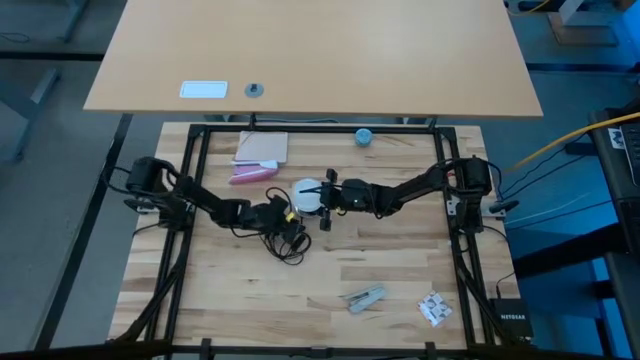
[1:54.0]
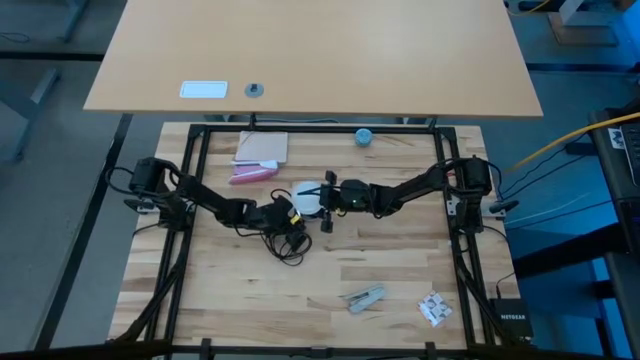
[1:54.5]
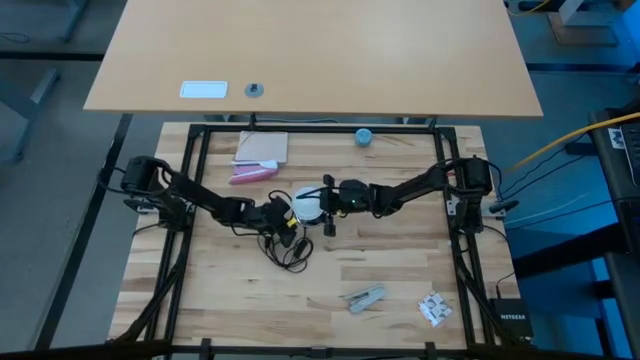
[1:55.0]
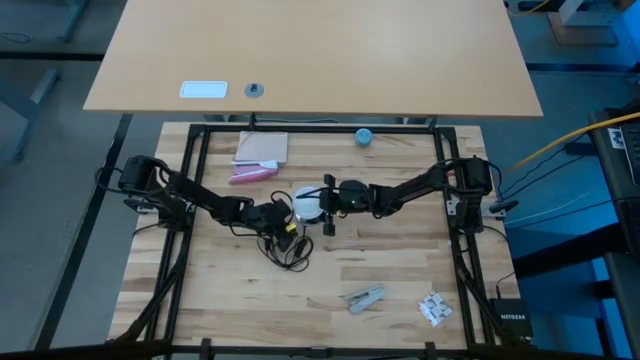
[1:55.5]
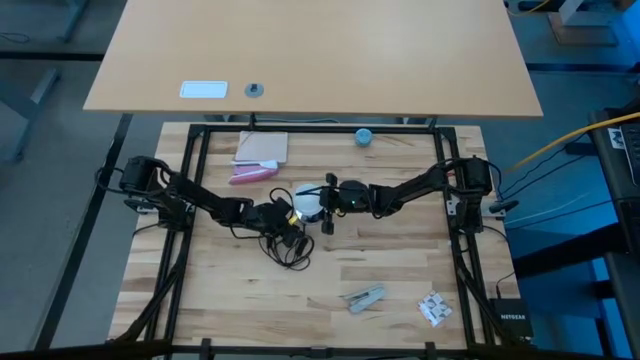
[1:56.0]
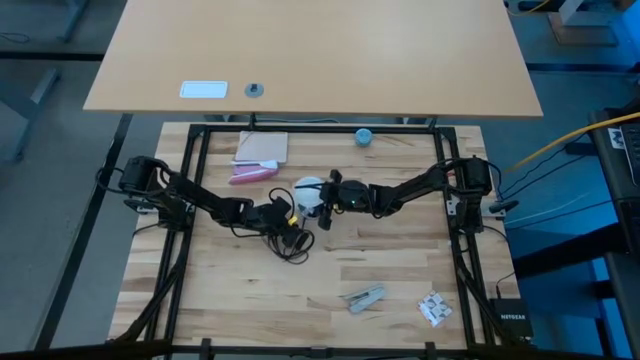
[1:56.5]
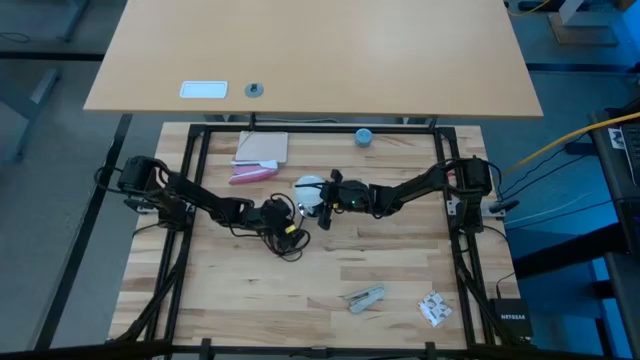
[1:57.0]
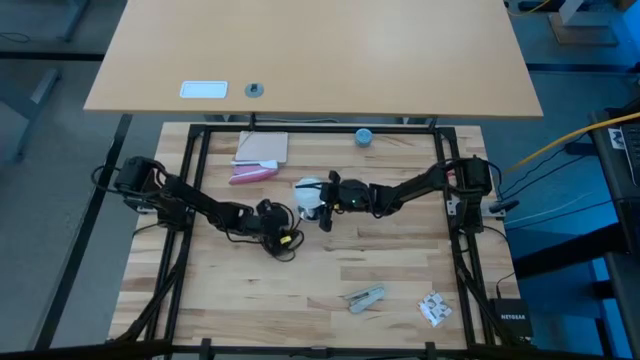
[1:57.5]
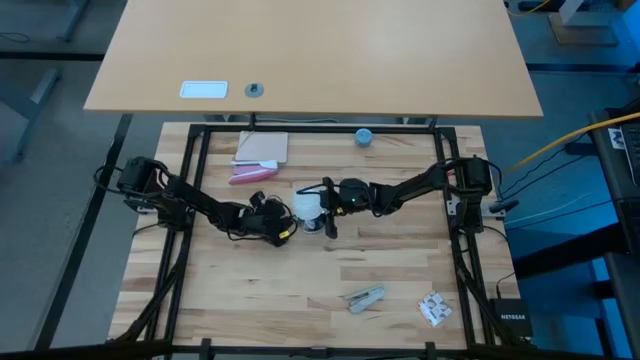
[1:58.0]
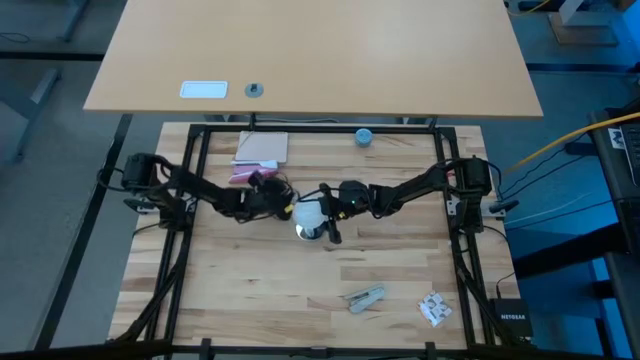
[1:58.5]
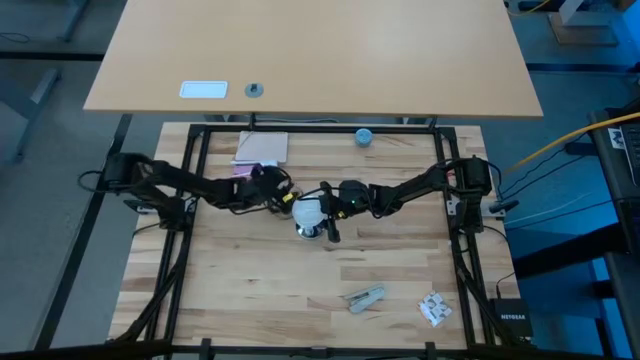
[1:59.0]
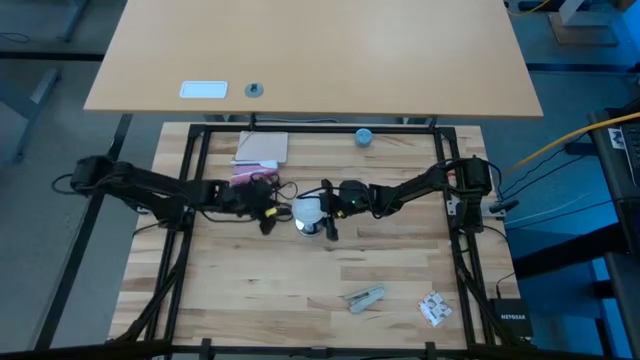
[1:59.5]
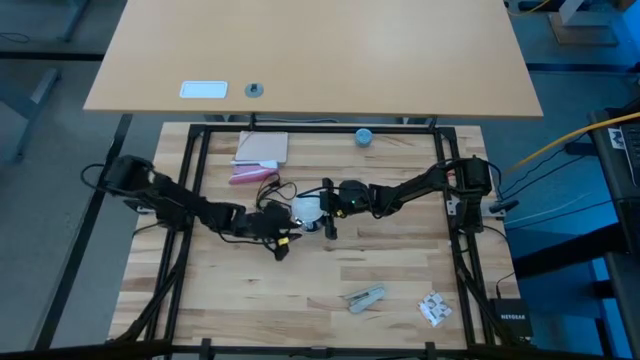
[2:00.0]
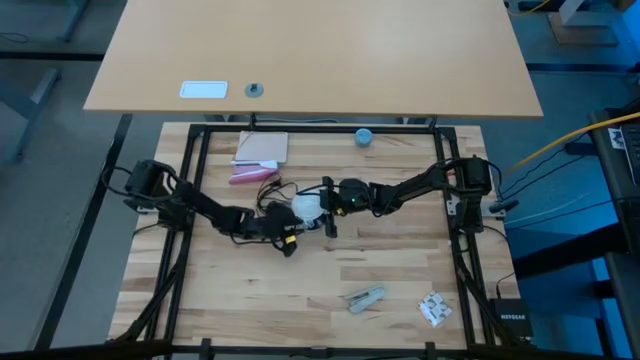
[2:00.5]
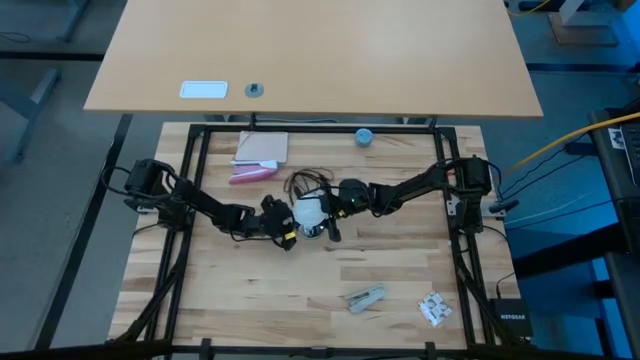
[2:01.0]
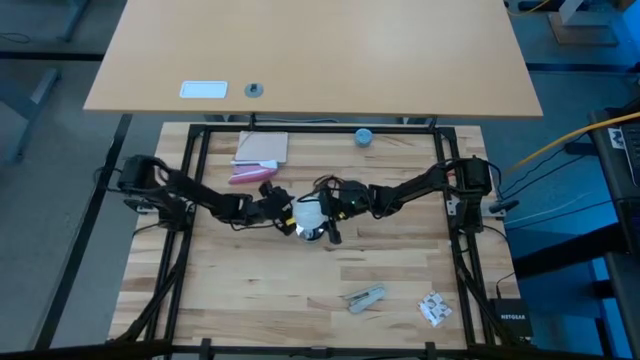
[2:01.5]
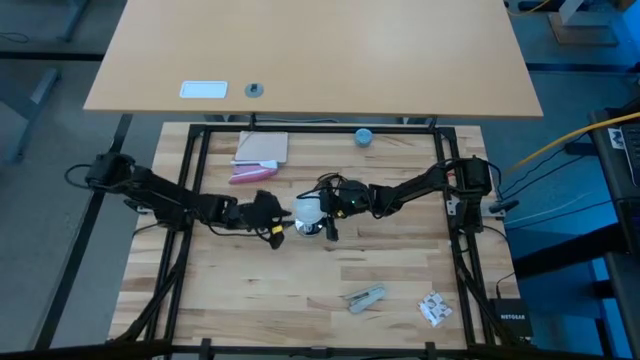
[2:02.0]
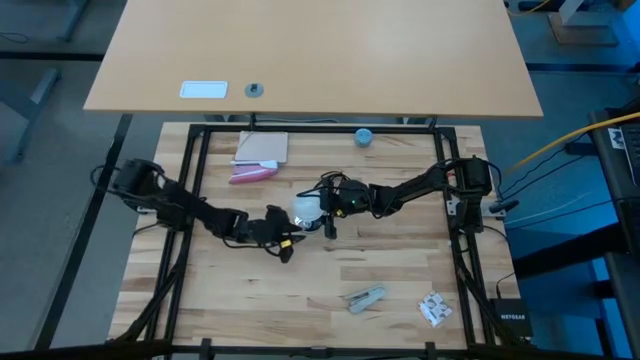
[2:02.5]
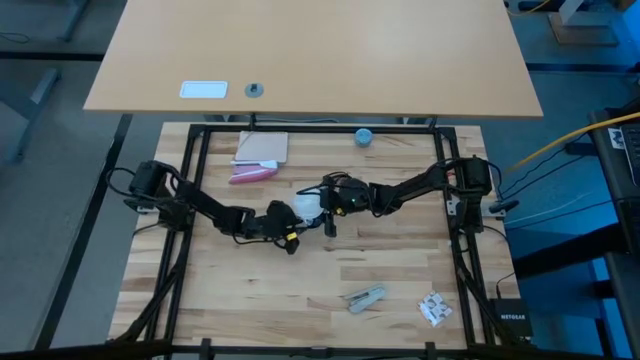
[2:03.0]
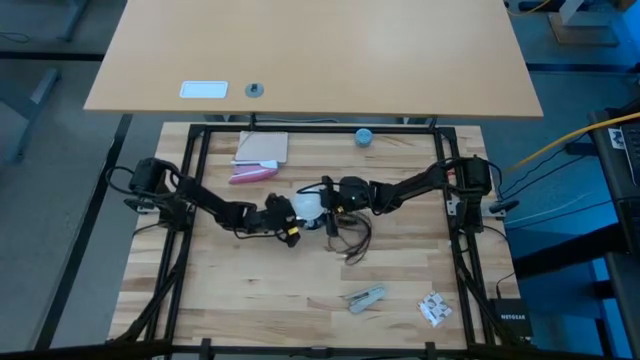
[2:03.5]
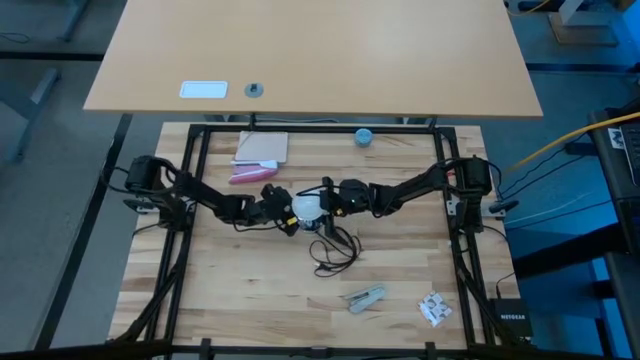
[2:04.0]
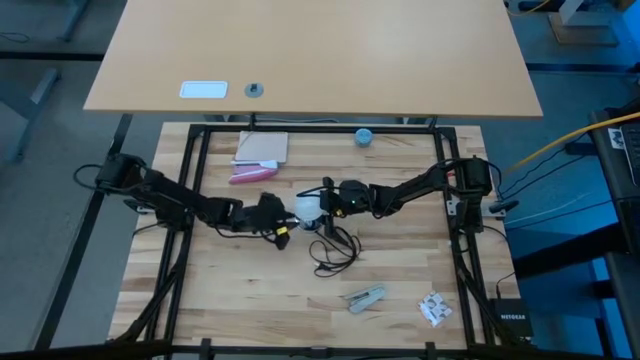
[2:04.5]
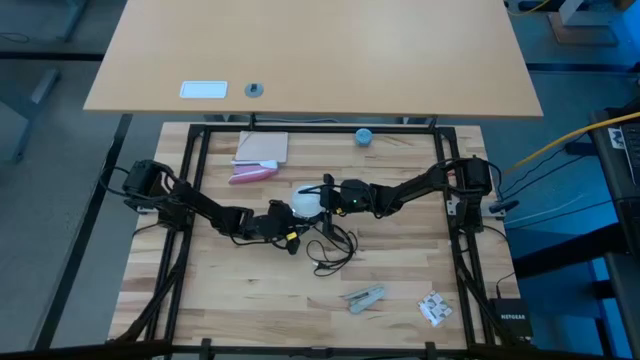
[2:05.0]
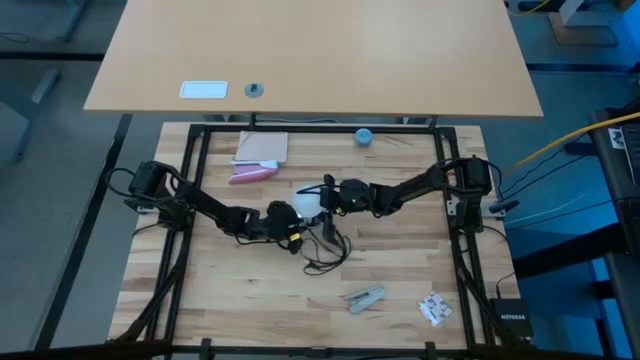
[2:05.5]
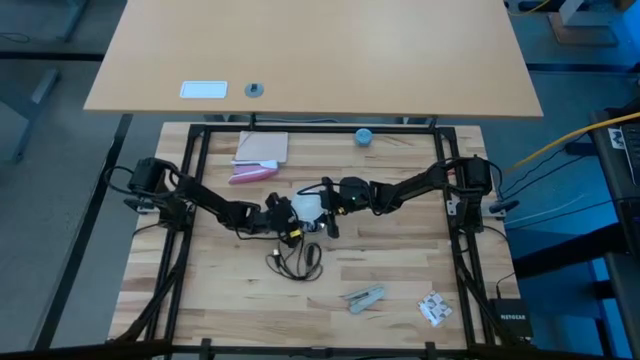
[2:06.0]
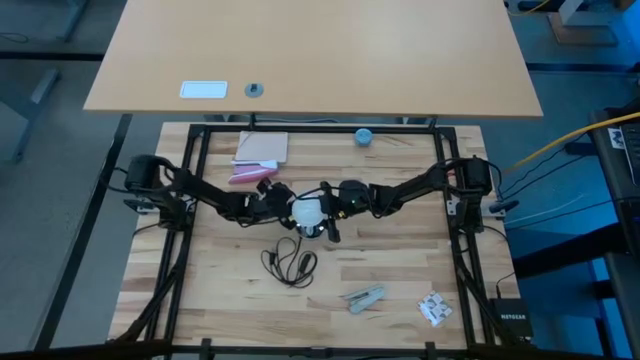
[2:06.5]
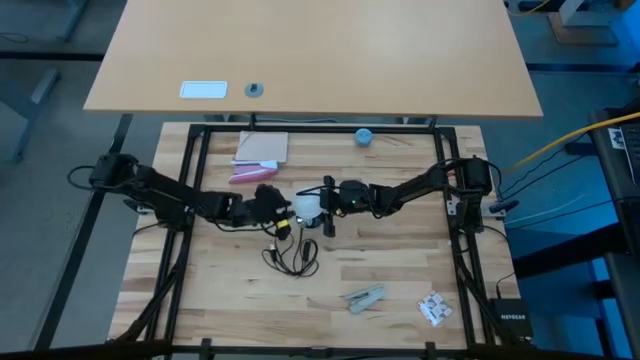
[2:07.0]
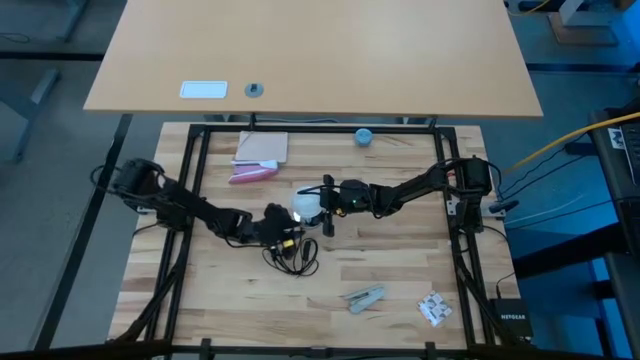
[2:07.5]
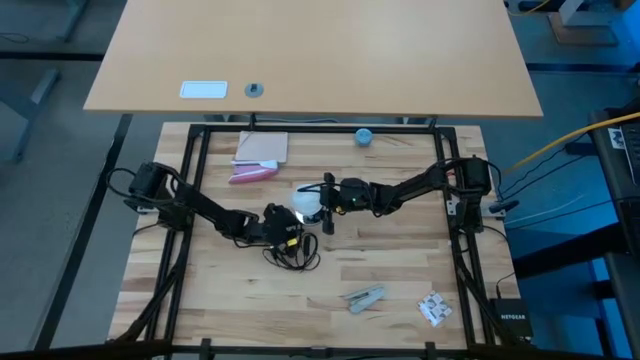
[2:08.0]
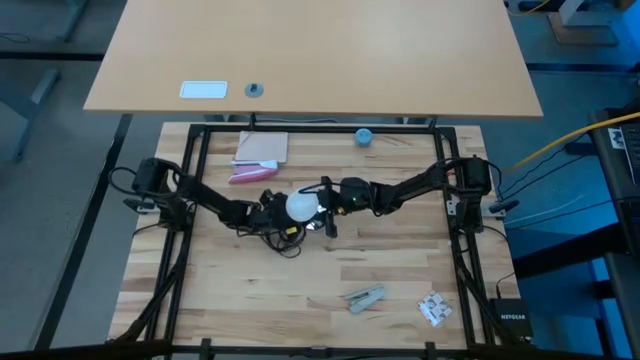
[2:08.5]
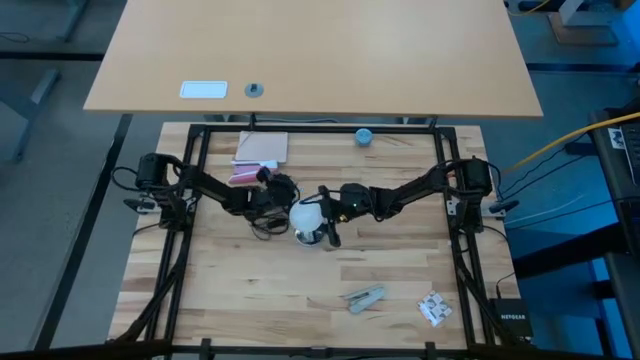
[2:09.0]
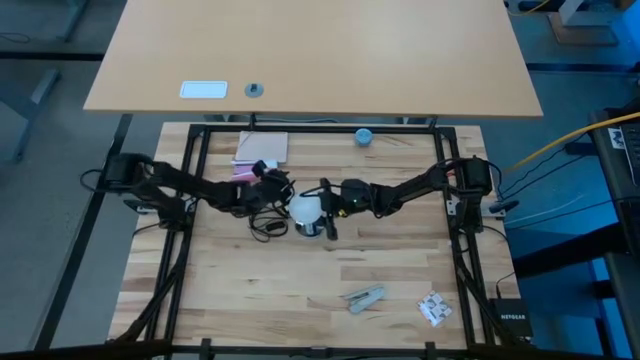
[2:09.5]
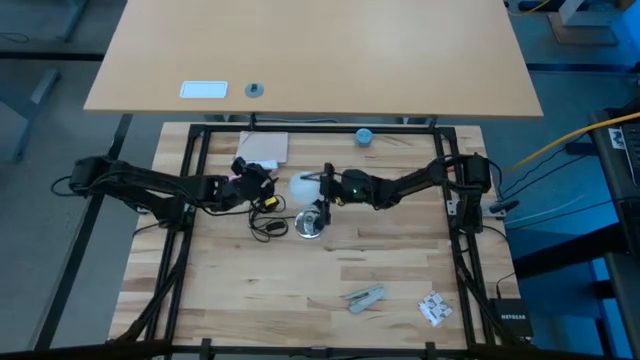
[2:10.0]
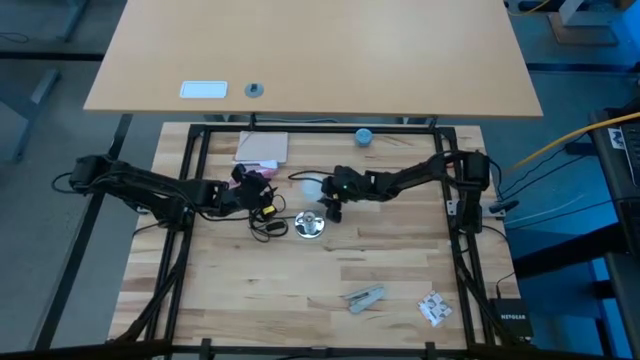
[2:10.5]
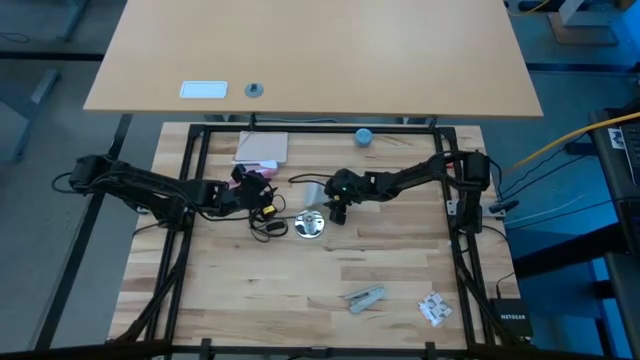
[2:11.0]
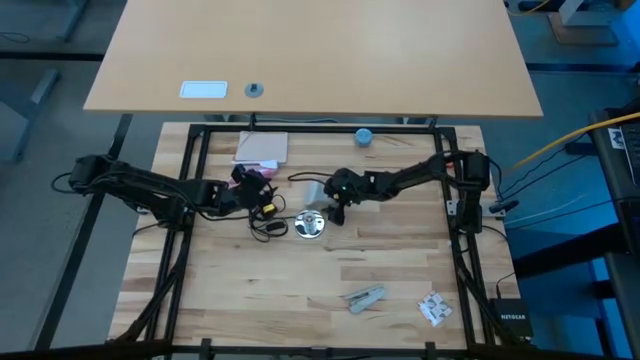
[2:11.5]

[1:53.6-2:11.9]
Task: Screw lightbulb
Remove the lightbulb from the lamp

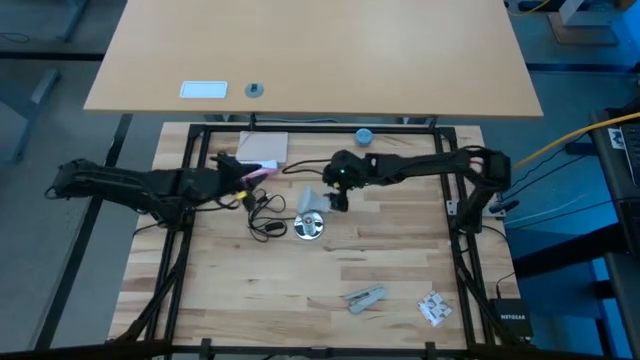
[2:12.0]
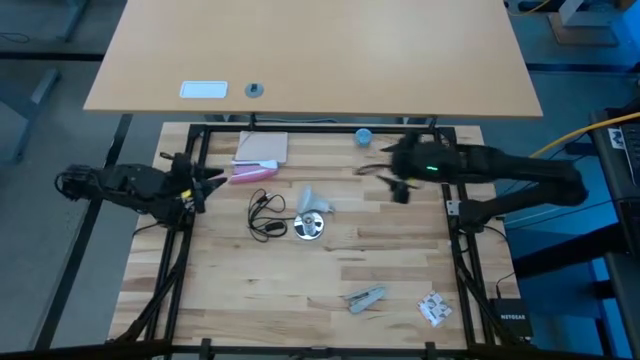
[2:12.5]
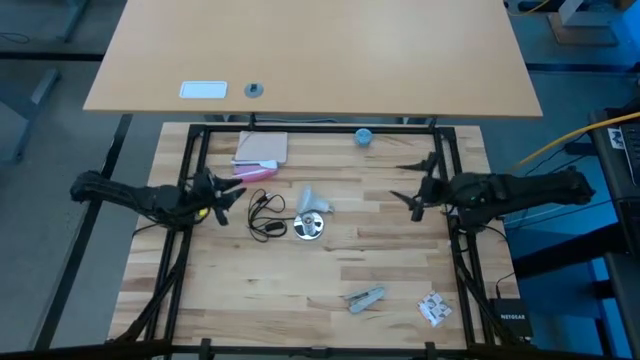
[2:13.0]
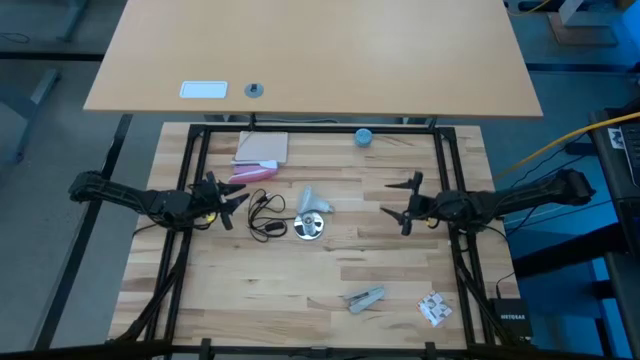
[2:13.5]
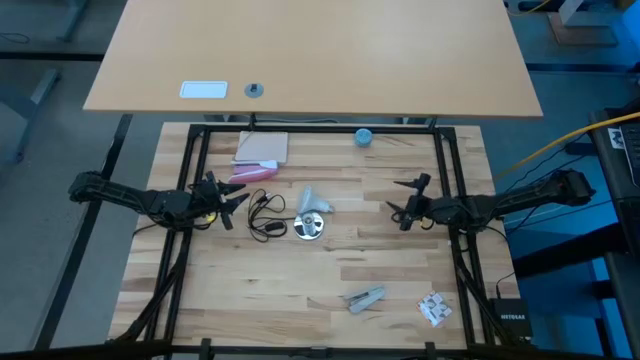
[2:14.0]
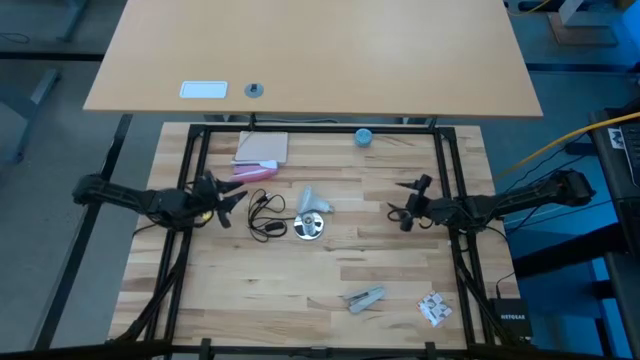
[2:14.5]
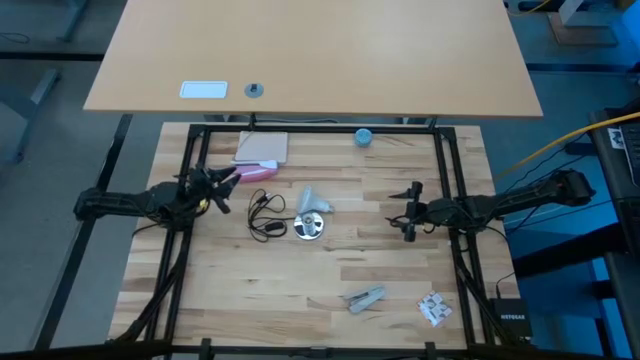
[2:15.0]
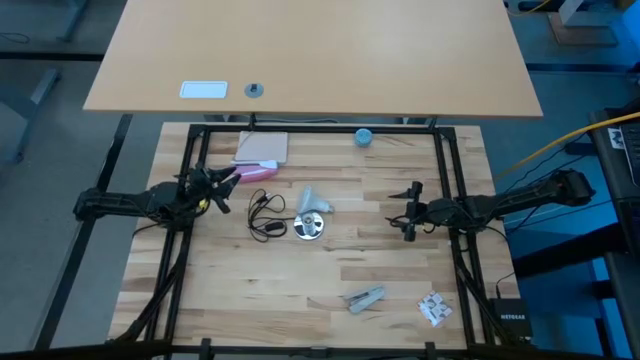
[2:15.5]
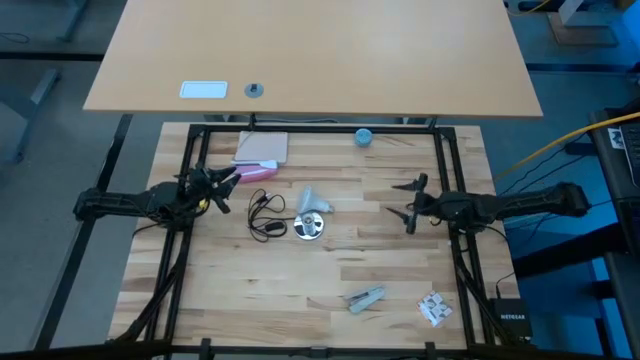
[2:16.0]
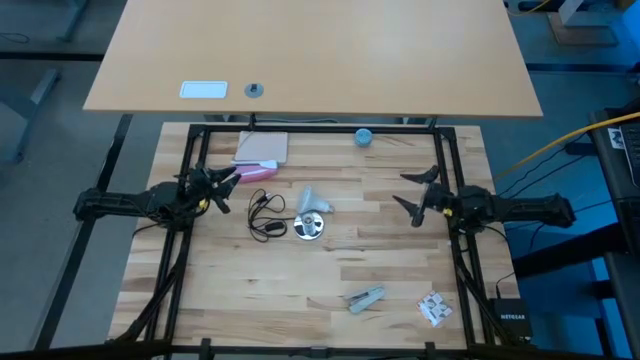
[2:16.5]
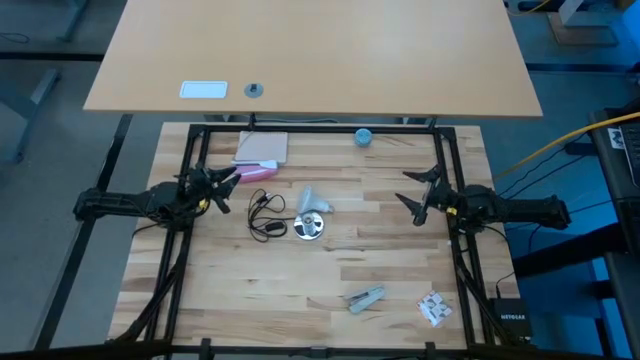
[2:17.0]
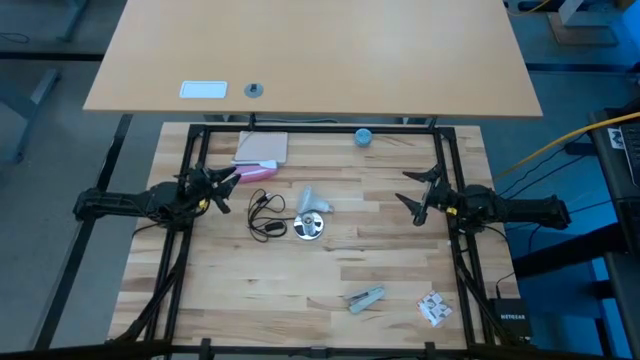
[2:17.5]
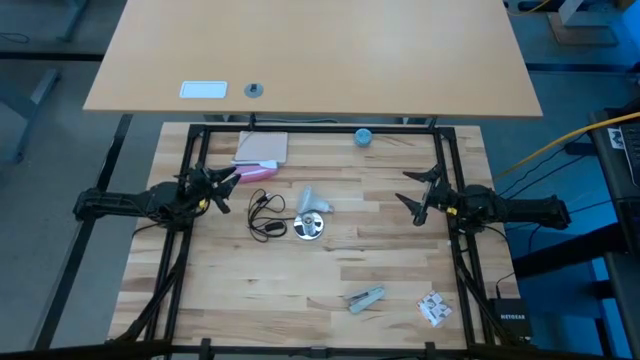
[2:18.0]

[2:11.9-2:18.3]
Return to Home Position
